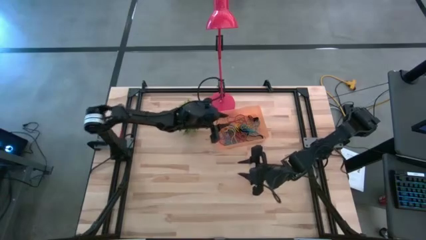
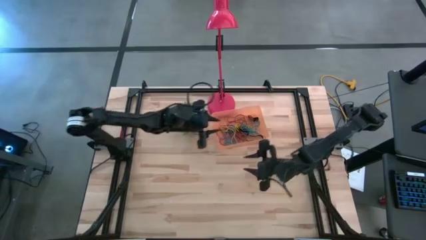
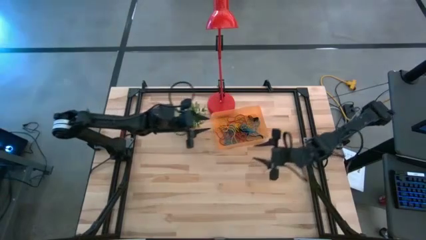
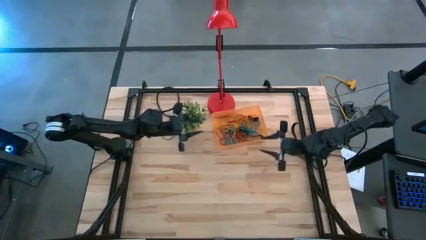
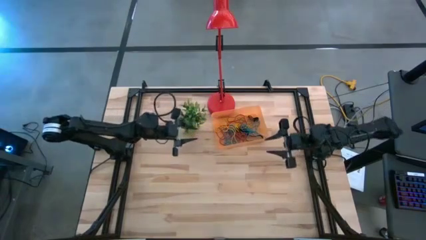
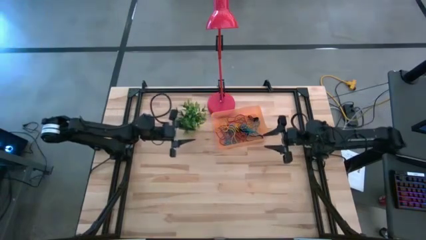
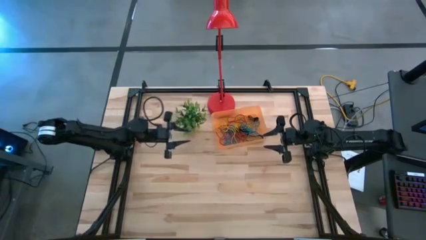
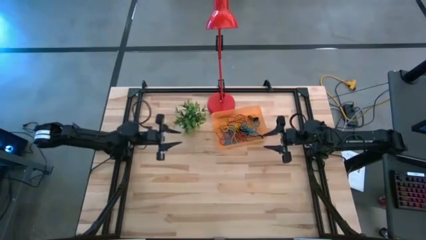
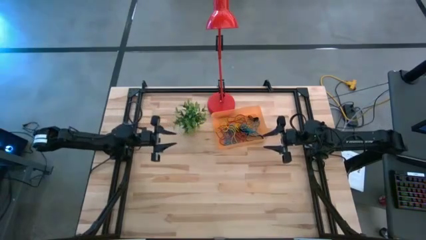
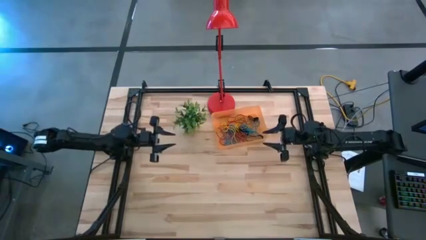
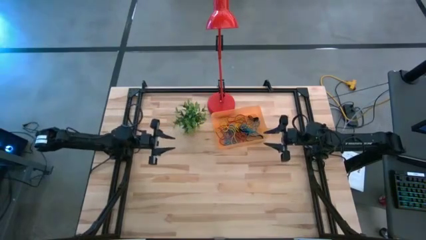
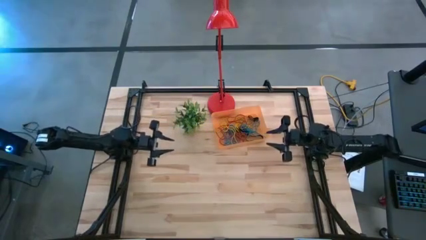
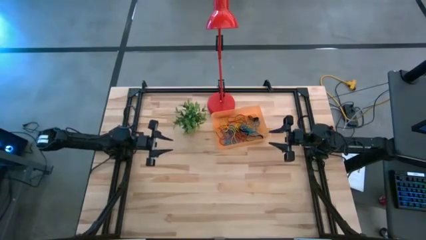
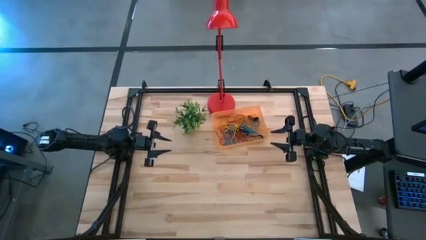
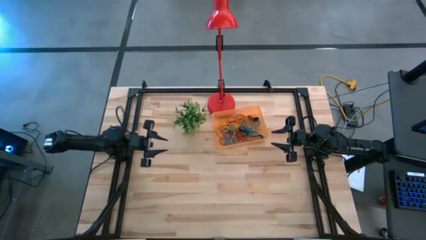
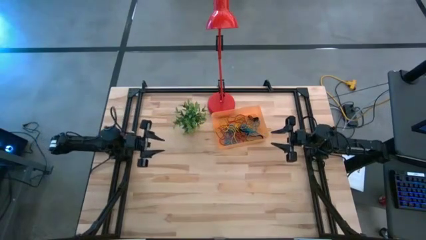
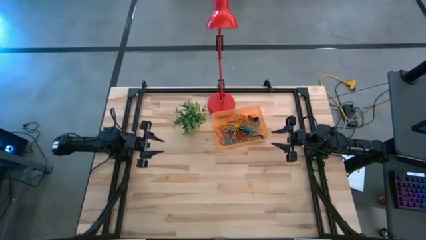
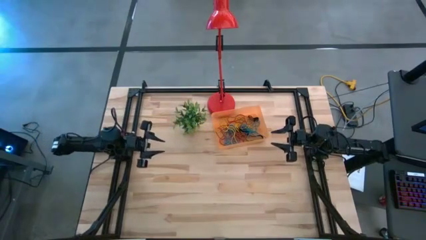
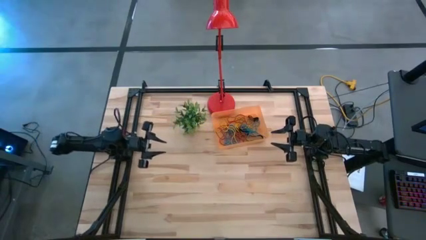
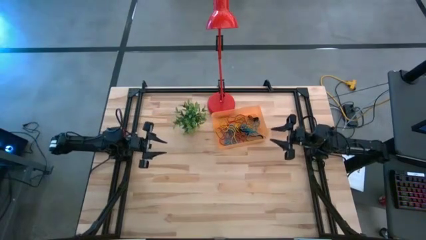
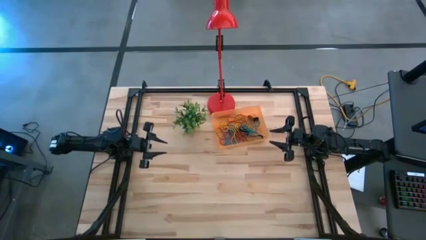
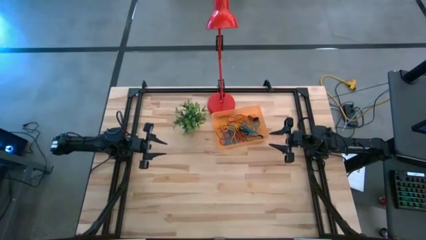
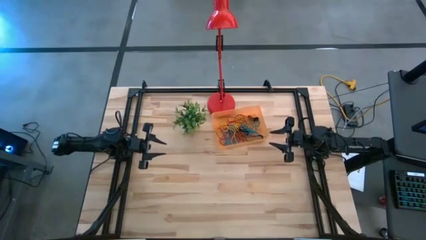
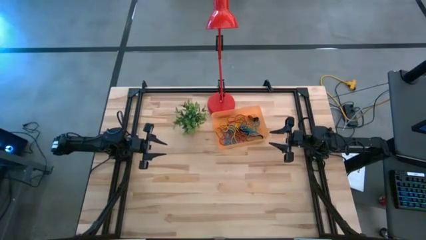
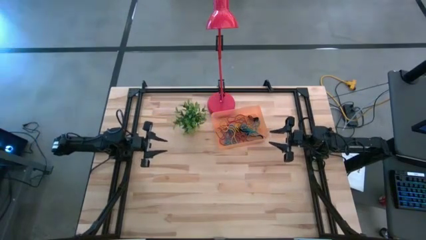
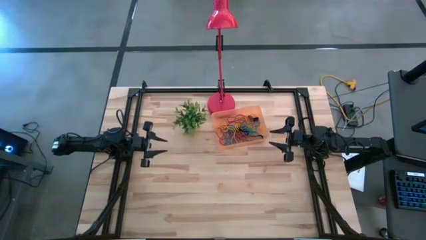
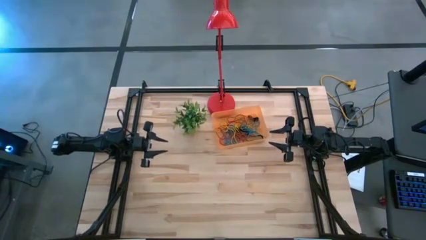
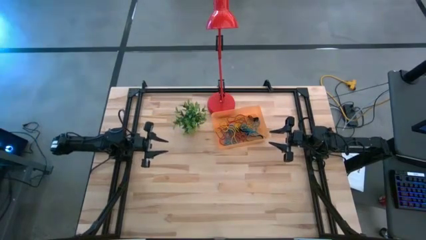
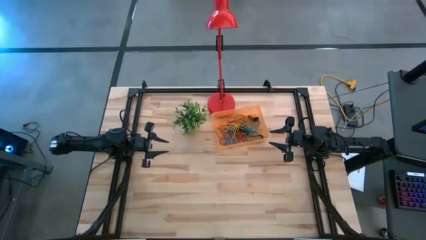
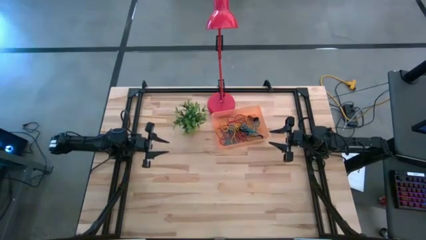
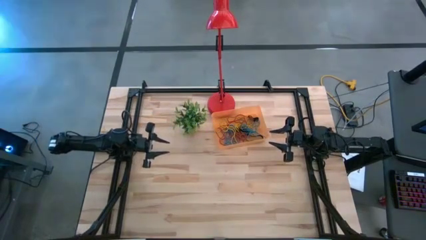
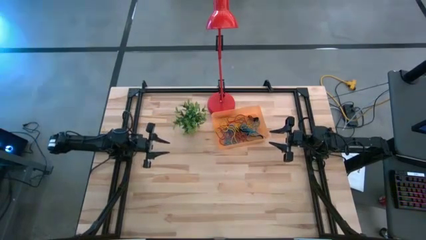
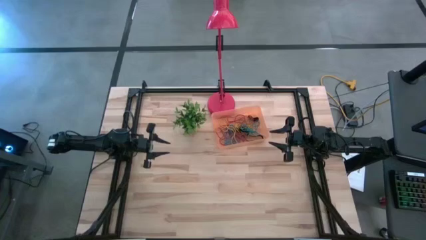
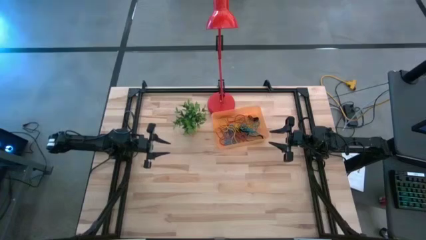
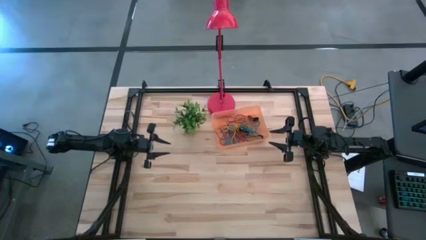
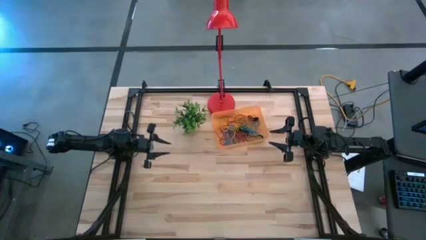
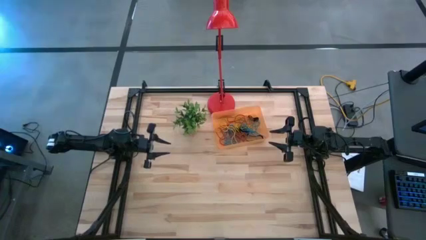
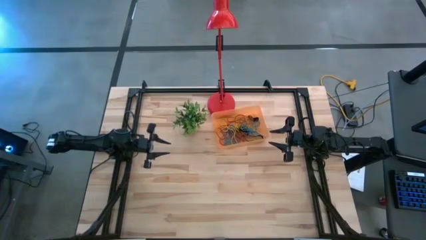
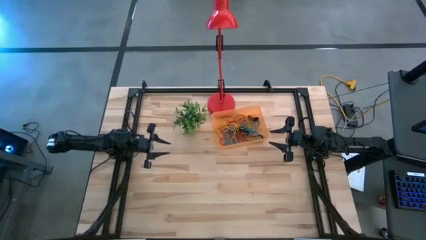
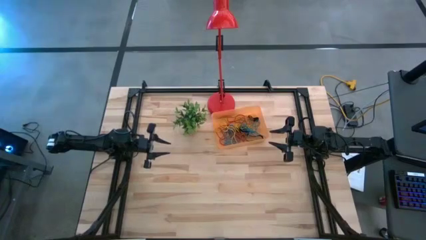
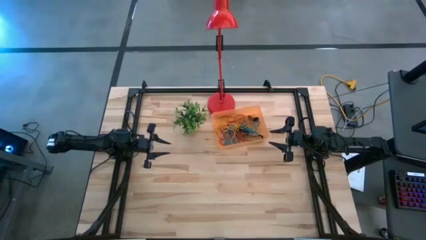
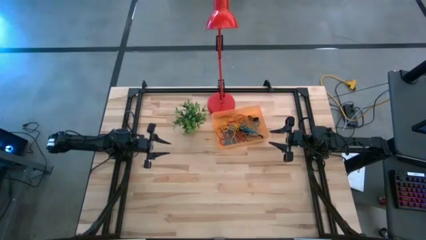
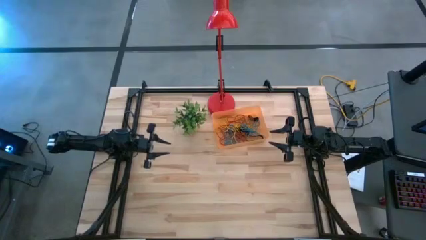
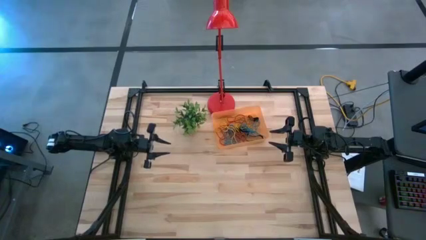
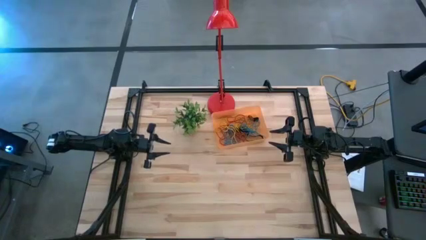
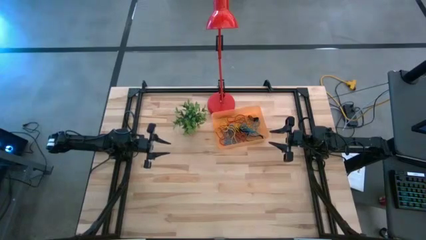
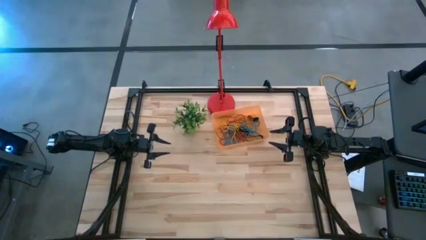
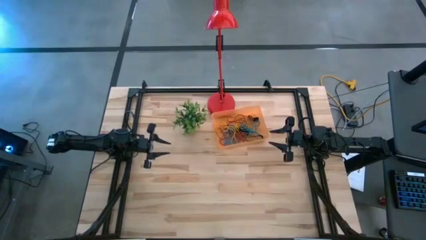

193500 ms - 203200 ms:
Task: Pick and place rubber bands into bin
Return to Home Position
